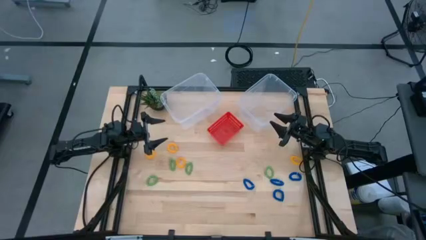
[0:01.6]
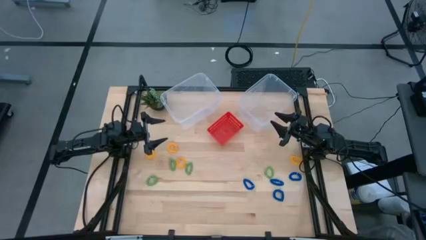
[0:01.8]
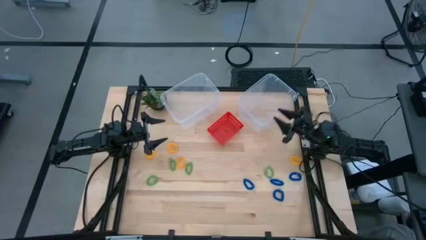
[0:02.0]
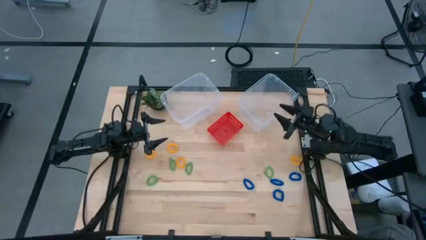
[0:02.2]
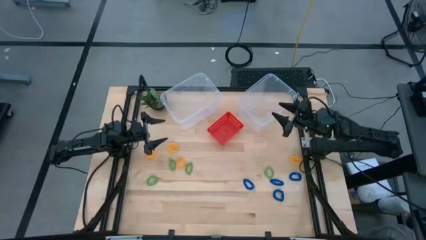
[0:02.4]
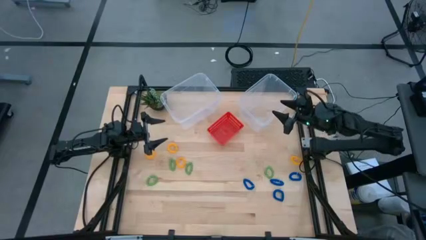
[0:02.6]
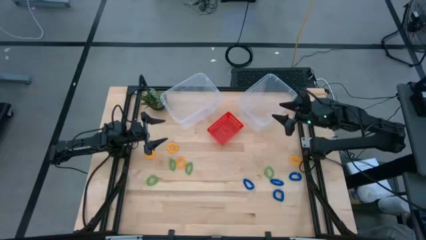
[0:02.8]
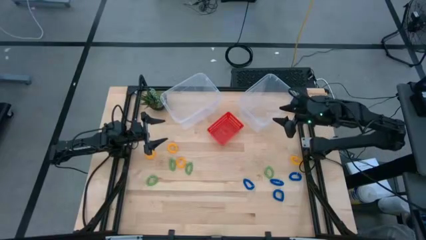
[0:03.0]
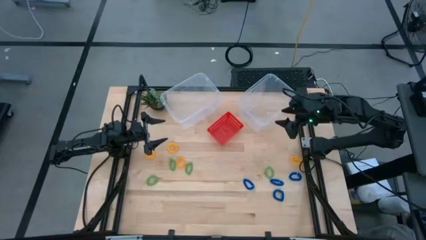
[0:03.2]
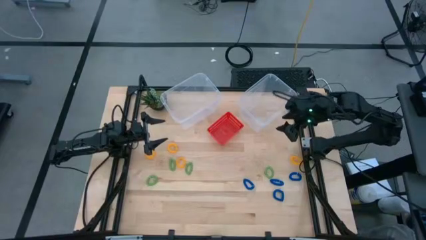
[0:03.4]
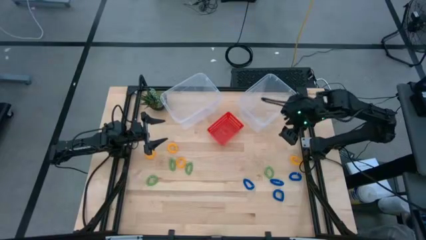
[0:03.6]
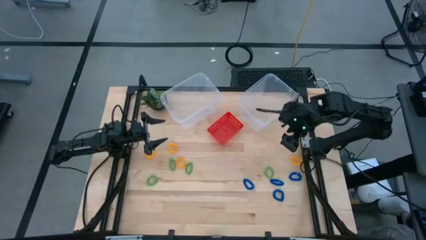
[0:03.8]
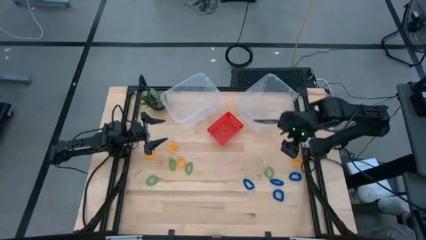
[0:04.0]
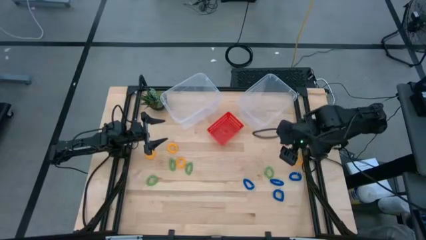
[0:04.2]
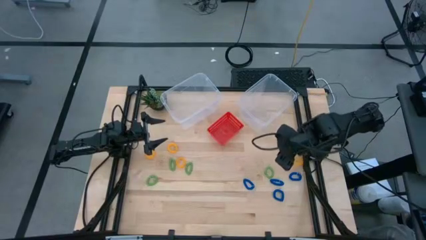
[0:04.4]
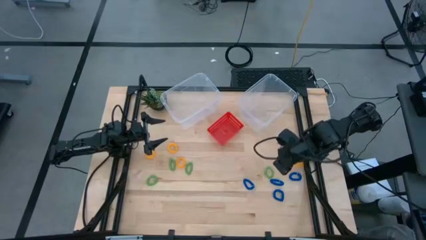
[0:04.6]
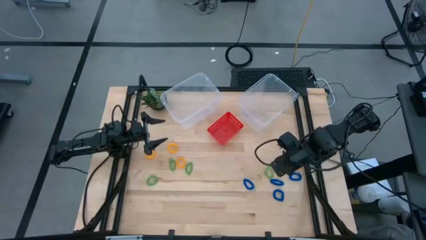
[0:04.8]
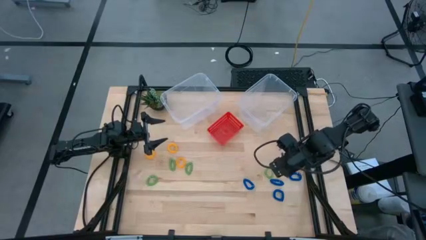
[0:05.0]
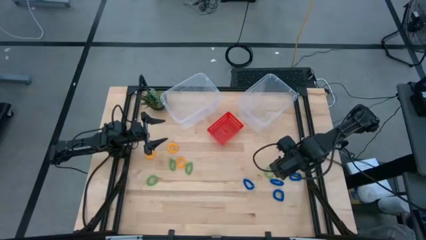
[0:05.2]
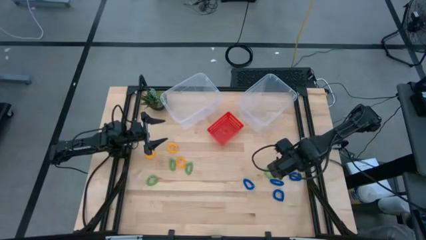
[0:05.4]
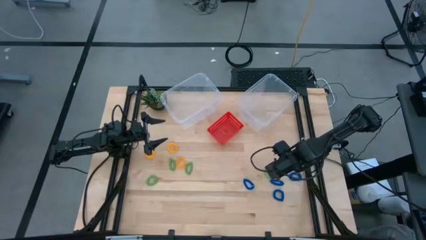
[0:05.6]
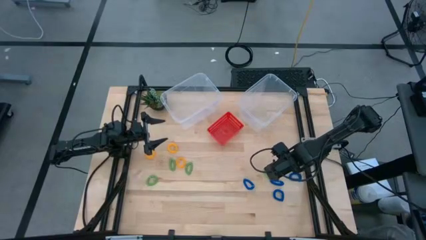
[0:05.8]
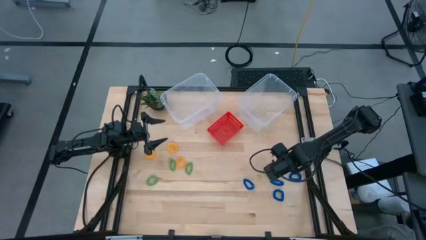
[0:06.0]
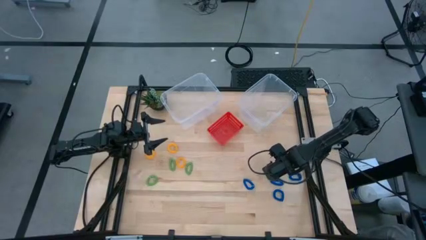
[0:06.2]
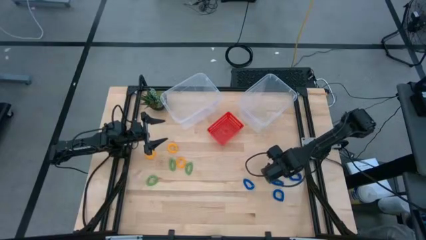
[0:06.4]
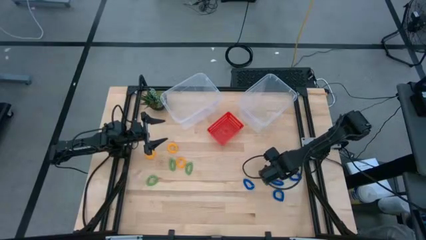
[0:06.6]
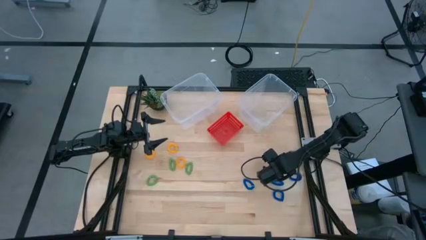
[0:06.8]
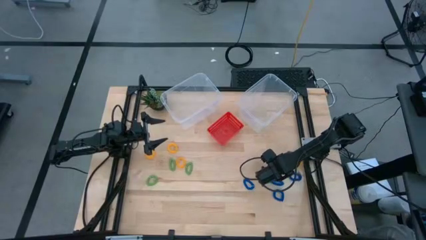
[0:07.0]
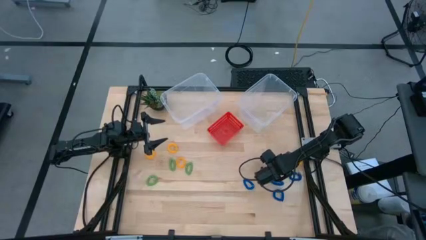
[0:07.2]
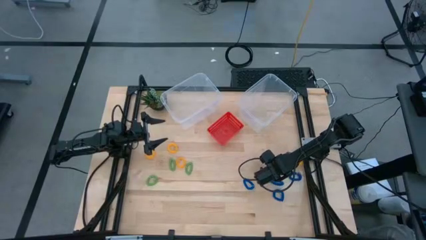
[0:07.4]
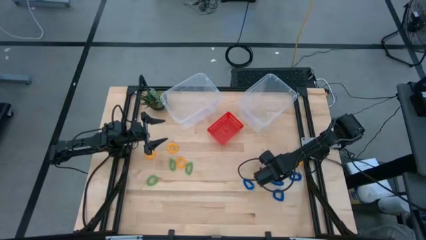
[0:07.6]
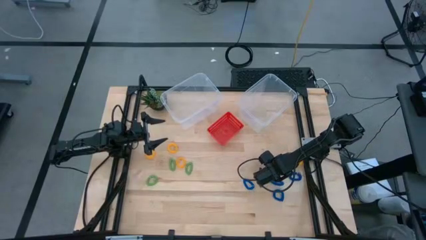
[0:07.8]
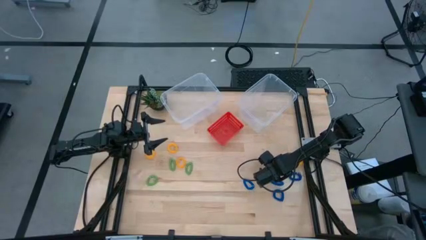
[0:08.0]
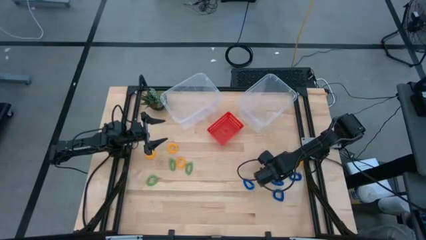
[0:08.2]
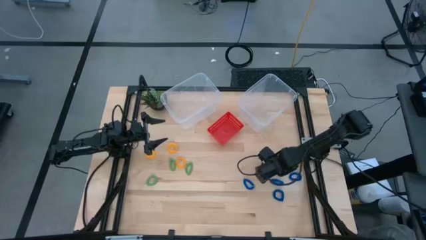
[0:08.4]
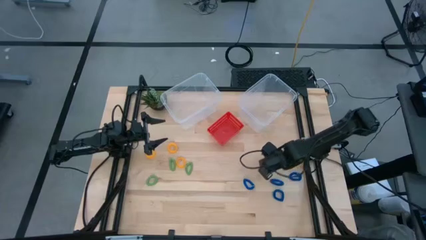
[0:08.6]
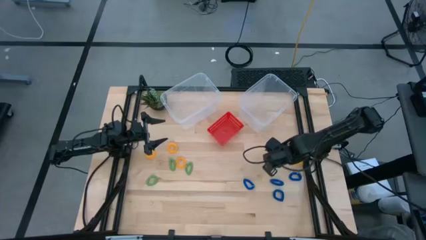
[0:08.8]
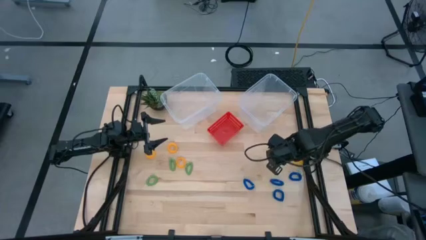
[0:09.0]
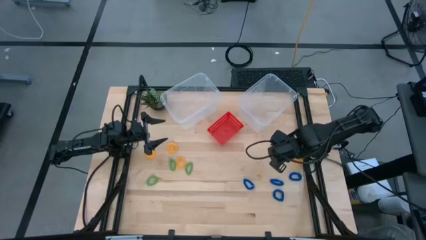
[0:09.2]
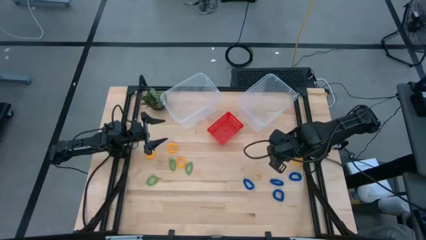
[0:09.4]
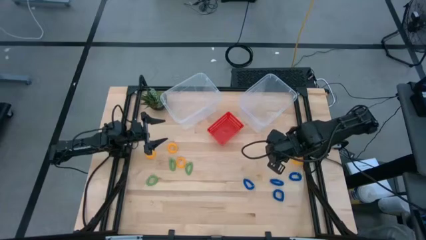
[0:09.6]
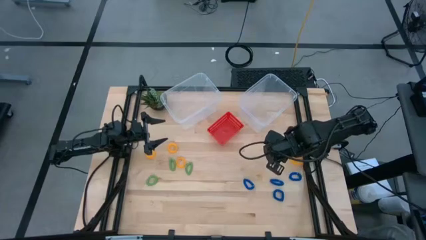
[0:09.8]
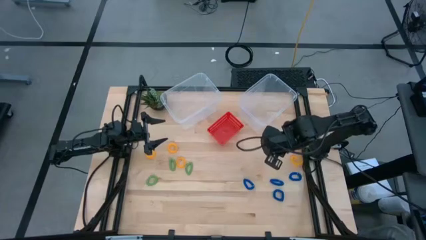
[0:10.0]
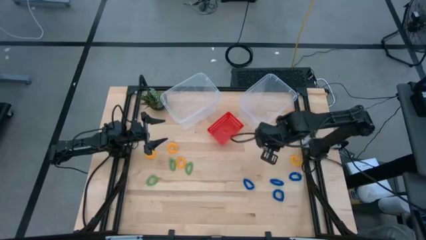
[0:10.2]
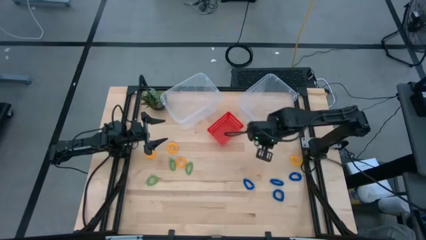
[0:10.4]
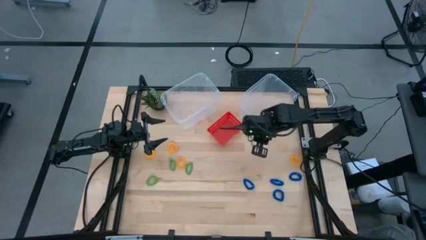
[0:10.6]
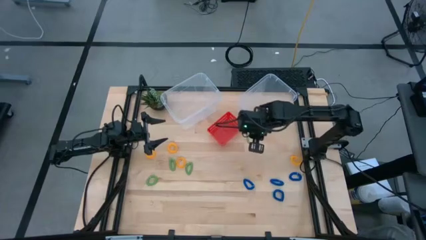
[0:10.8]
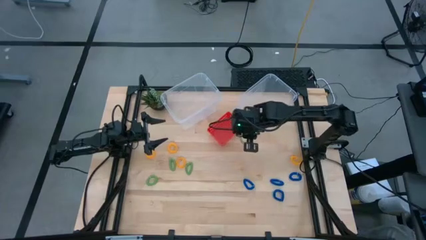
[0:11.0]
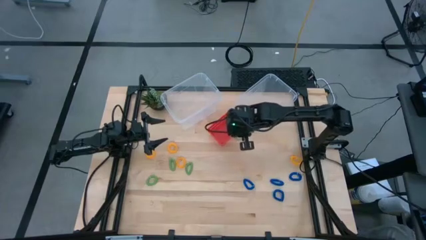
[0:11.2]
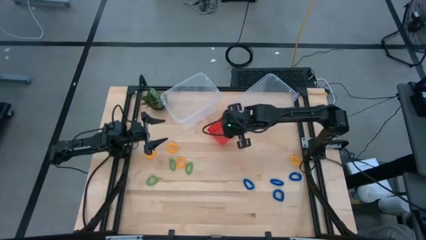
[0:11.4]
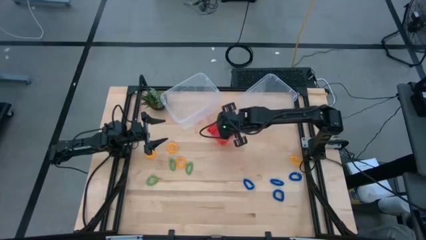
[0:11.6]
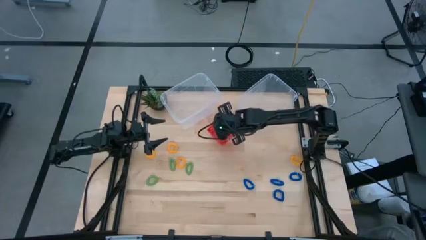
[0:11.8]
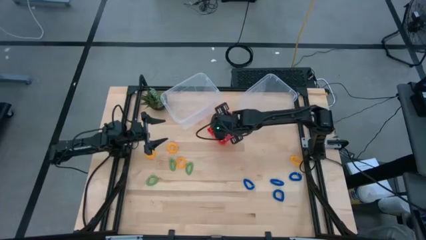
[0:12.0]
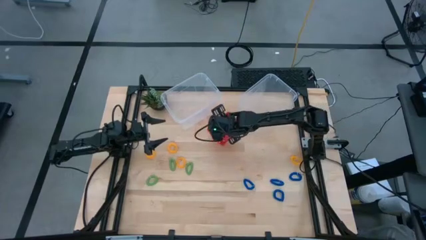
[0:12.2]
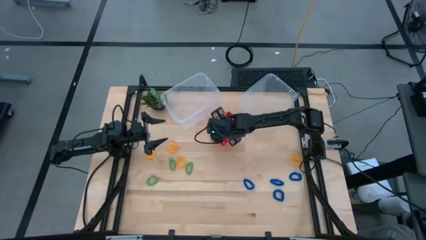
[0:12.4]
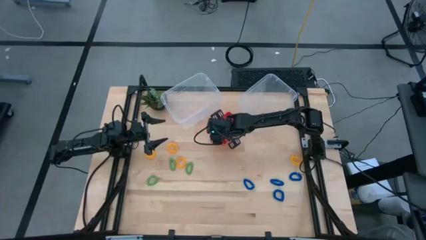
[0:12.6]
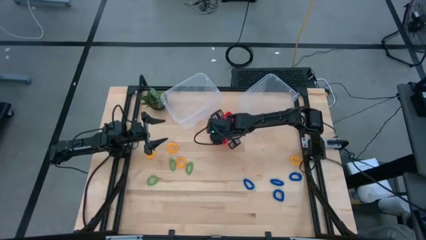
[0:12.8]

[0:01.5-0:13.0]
Task: Sort spring keychains
Put the green spring keychain into the red bin
